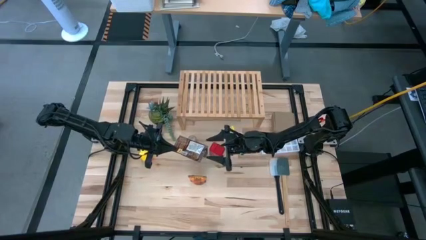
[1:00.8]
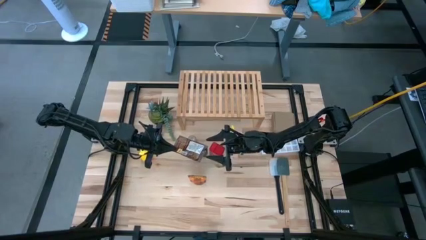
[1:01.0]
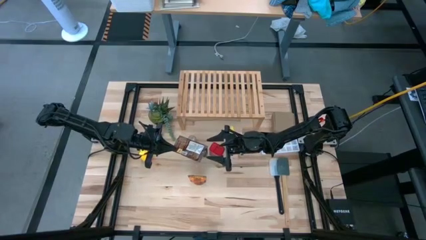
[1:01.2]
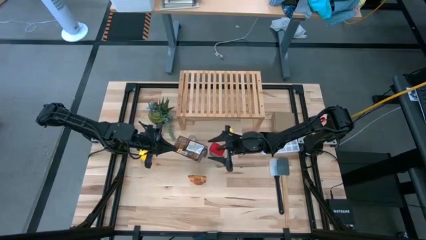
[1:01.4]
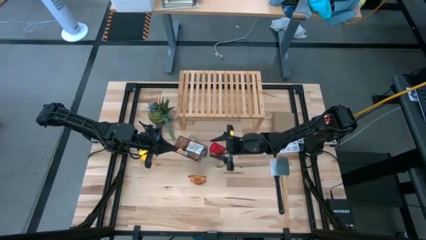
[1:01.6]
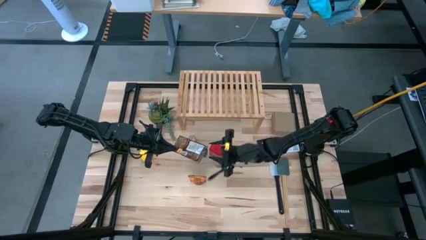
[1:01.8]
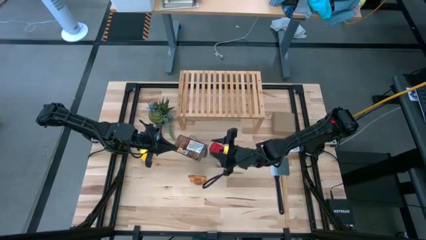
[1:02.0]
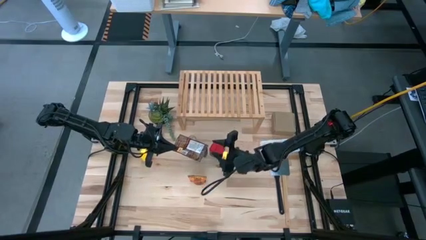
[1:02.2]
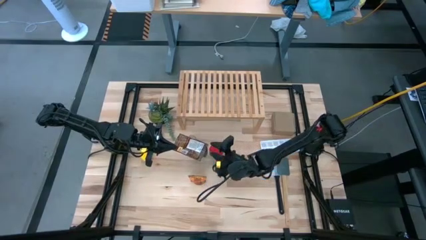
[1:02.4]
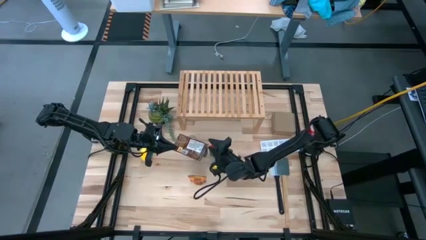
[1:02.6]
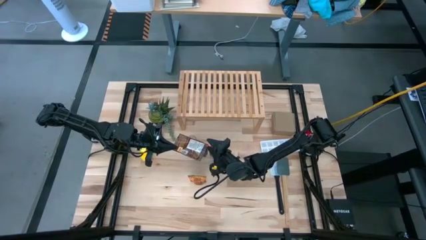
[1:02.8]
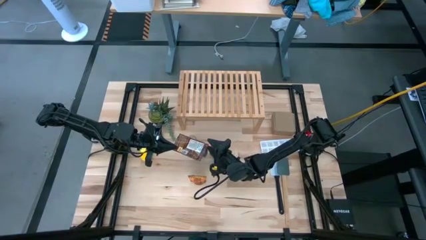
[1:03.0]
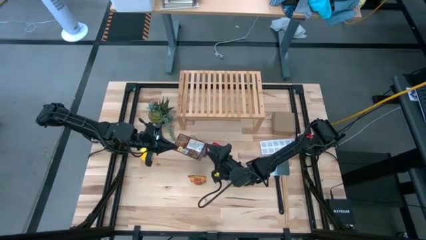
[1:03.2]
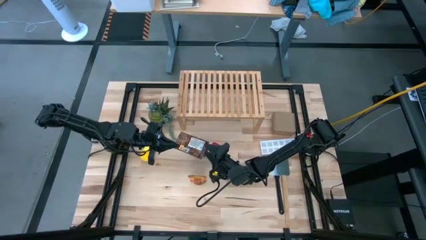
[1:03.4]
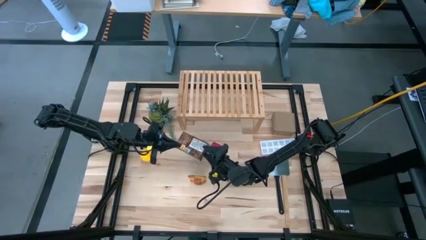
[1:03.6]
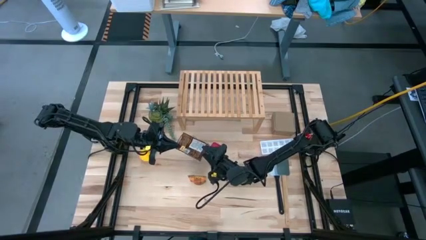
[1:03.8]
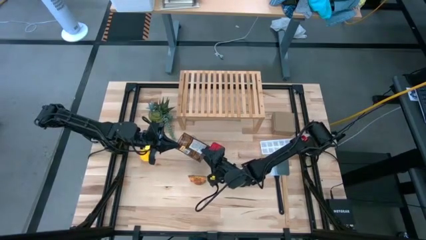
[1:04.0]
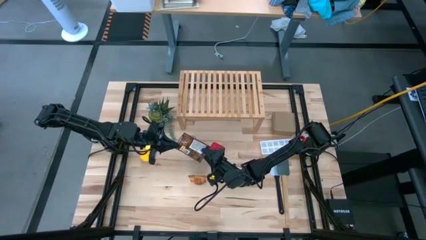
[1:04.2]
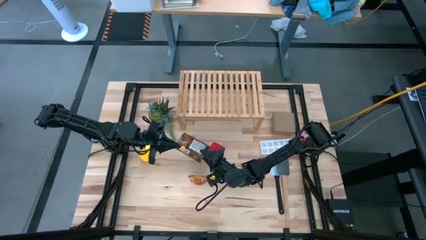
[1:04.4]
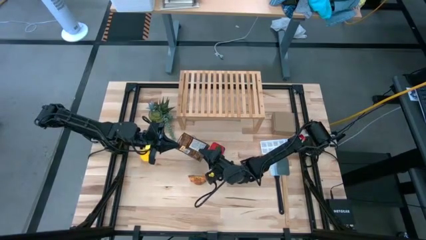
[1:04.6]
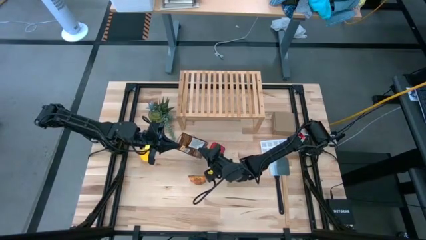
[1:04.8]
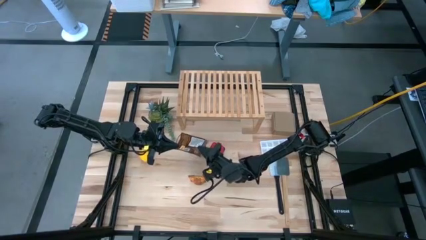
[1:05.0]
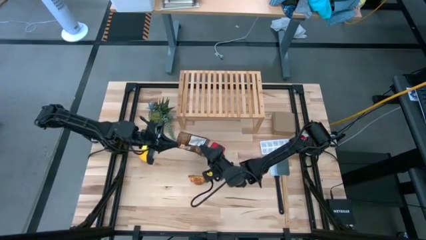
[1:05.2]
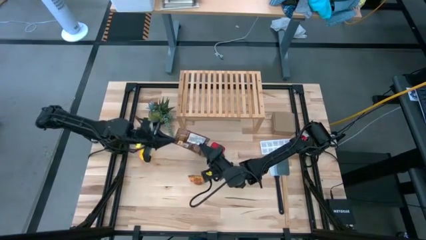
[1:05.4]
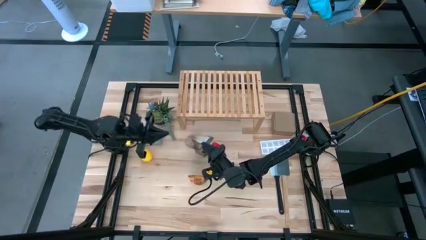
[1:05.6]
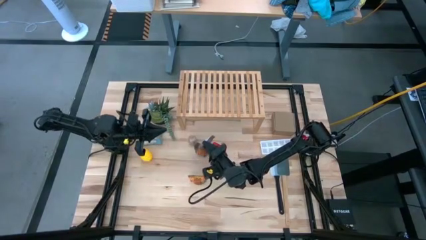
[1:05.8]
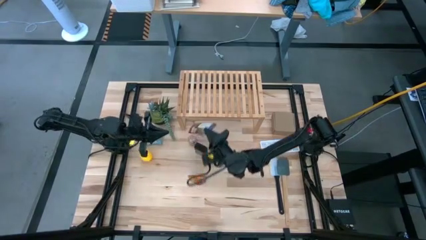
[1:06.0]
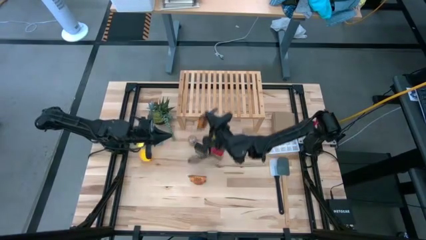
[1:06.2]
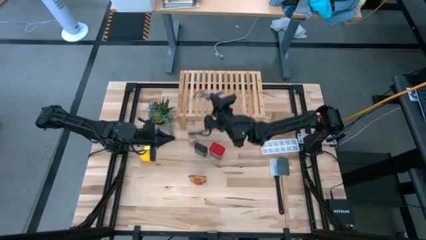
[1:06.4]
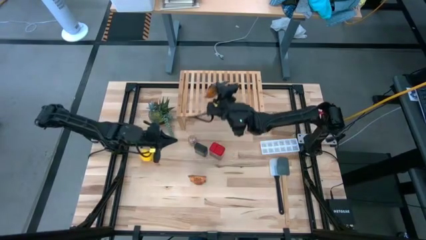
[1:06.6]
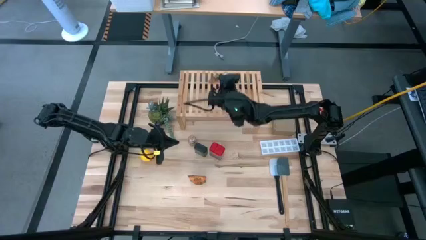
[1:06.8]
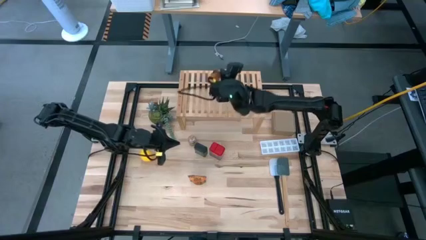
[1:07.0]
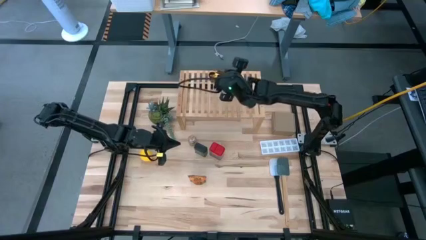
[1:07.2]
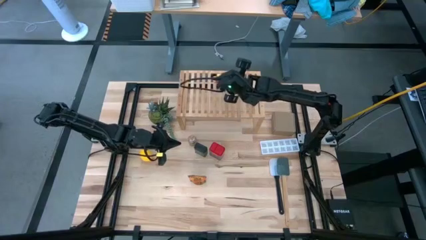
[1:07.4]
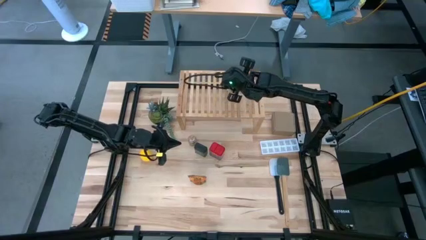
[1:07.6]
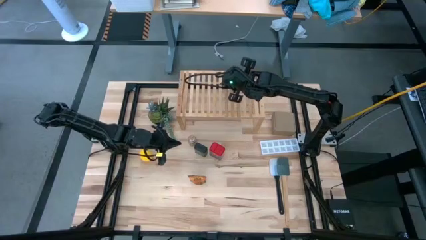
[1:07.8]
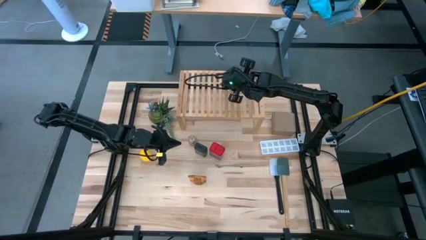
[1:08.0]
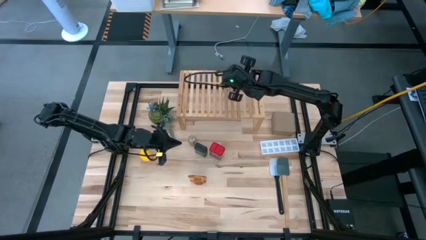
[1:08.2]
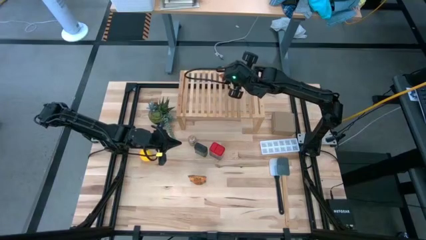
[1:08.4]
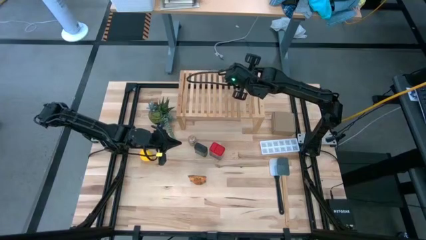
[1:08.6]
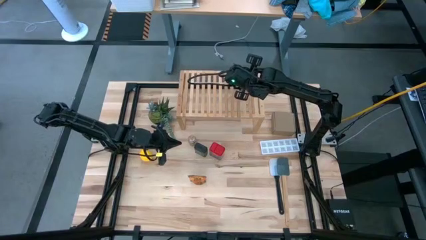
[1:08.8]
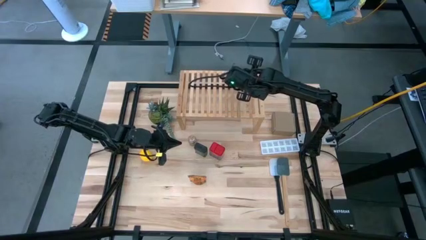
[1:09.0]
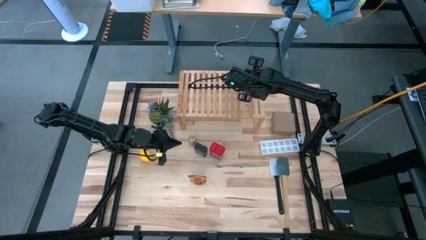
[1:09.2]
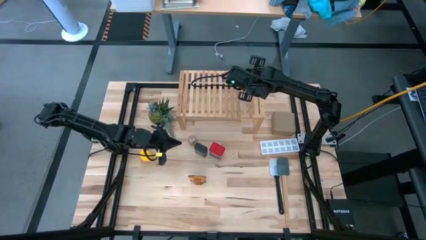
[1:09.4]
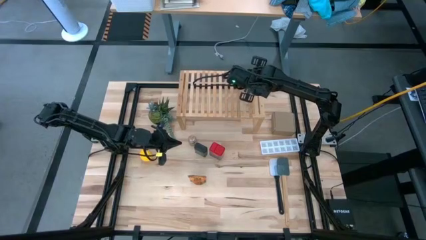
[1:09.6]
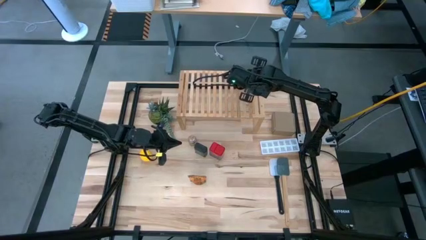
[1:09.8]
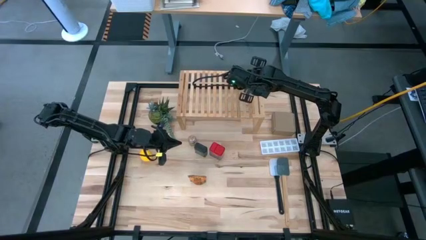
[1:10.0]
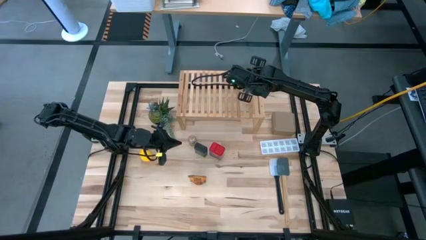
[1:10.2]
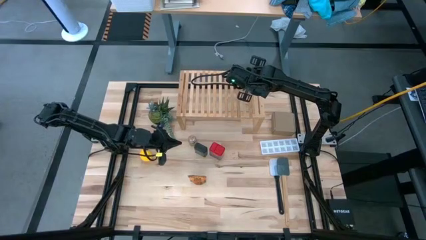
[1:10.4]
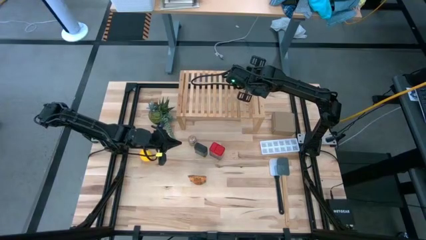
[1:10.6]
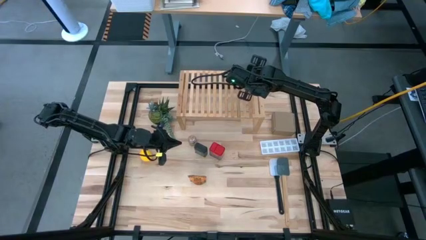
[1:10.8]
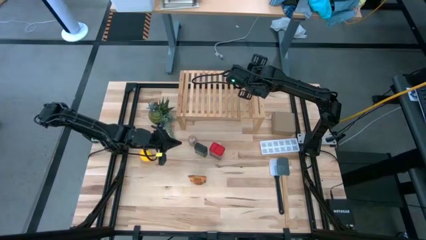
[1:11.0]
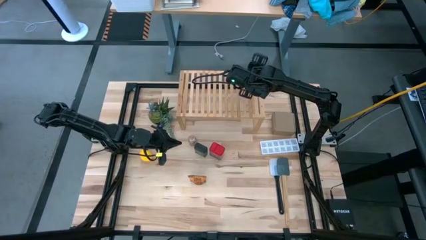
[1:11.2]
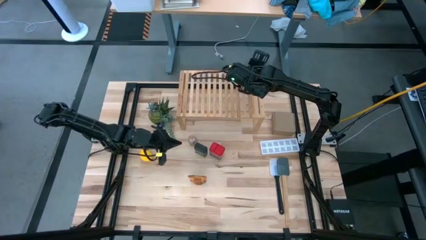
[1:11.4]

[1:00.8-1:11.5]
Task: Shelf spices
Put the orange seasoning pack on the shelf

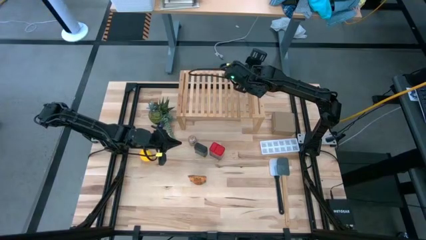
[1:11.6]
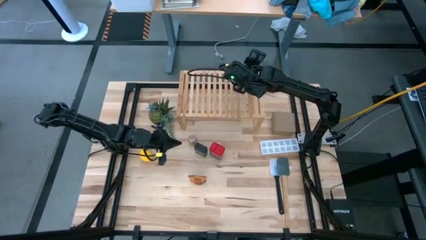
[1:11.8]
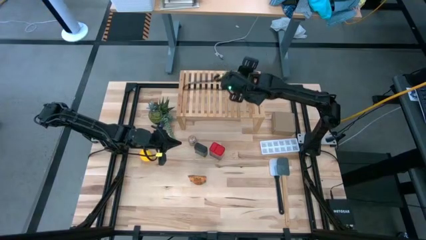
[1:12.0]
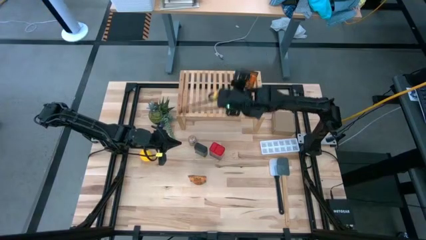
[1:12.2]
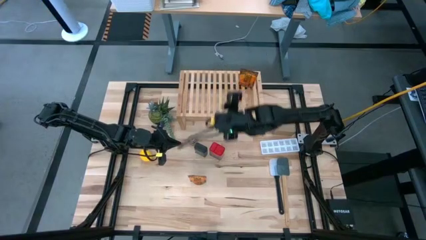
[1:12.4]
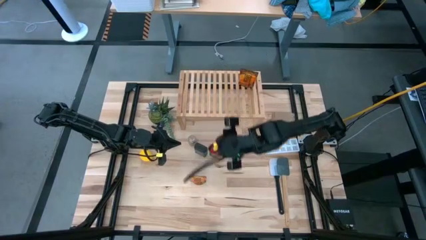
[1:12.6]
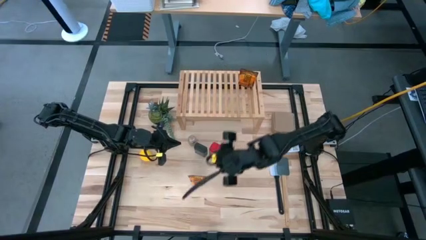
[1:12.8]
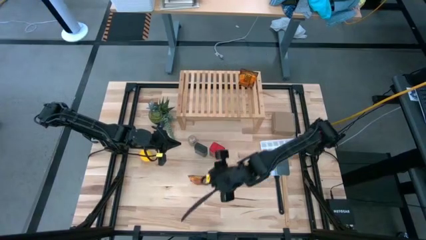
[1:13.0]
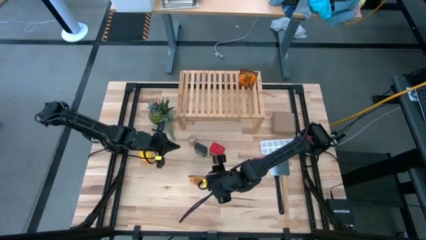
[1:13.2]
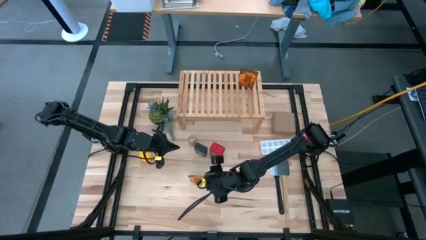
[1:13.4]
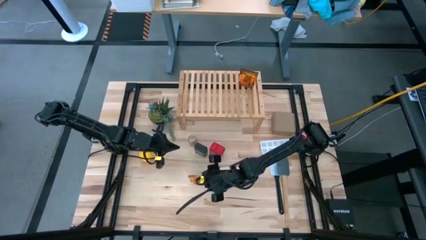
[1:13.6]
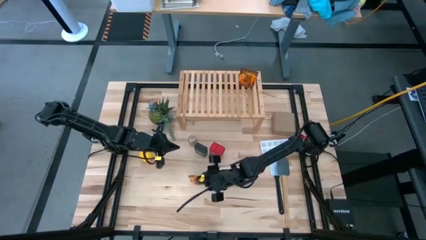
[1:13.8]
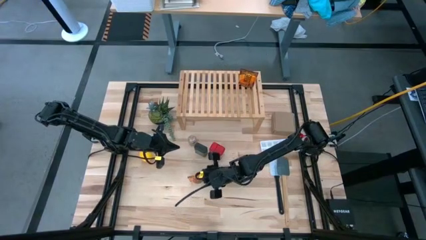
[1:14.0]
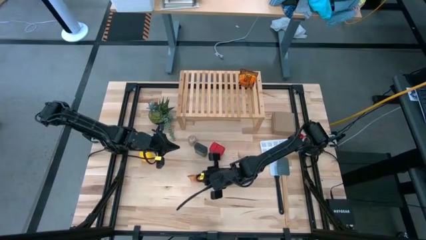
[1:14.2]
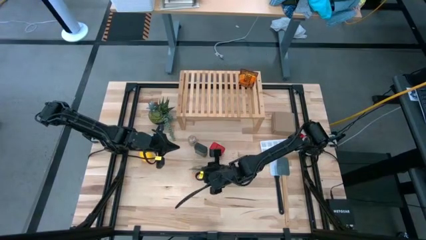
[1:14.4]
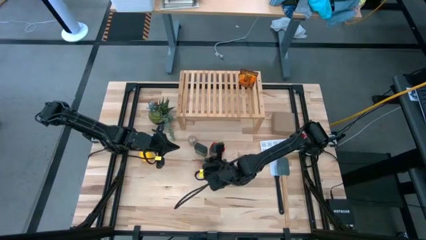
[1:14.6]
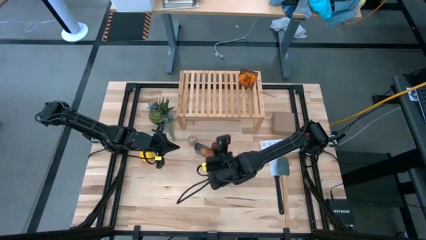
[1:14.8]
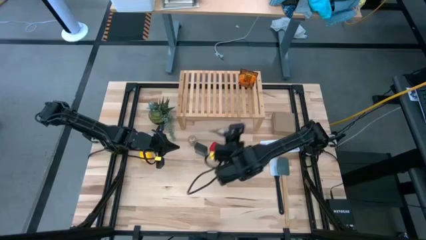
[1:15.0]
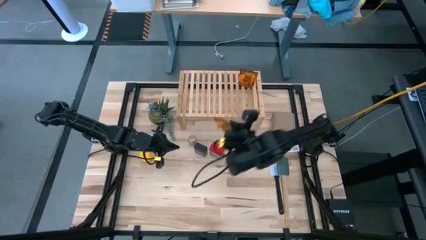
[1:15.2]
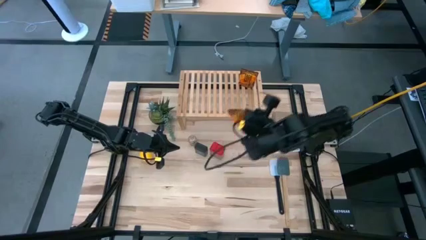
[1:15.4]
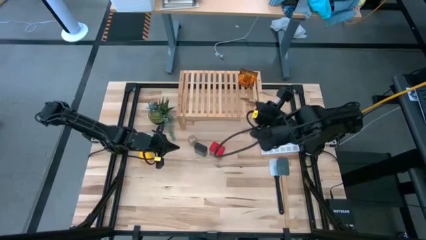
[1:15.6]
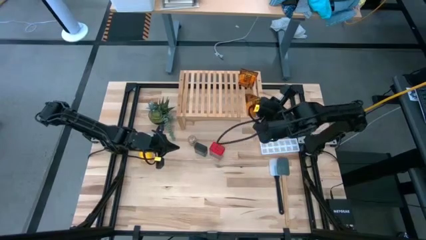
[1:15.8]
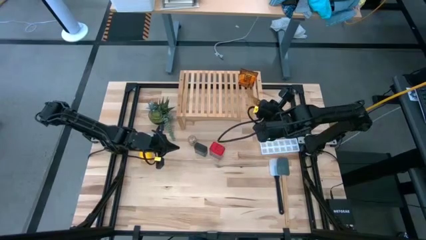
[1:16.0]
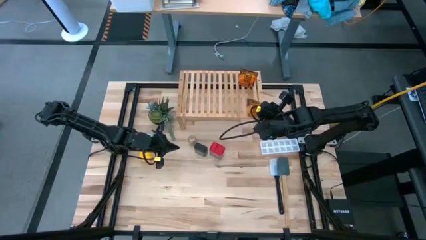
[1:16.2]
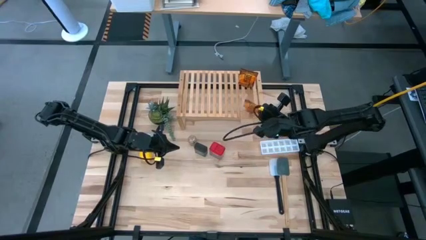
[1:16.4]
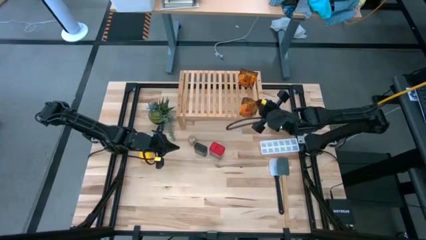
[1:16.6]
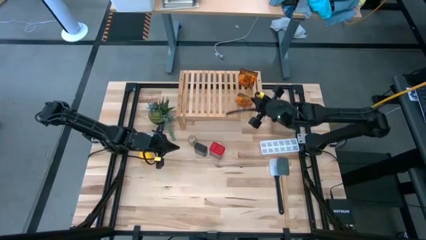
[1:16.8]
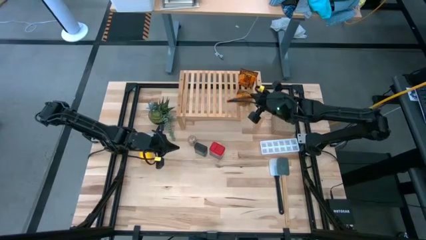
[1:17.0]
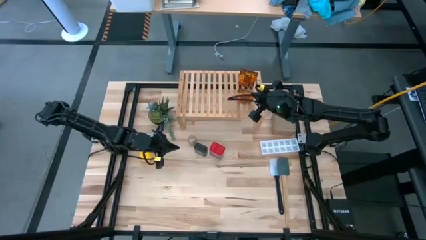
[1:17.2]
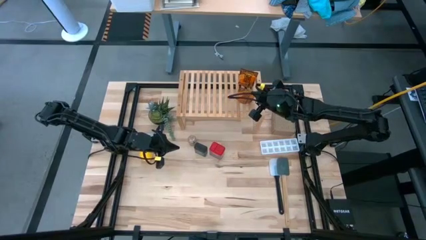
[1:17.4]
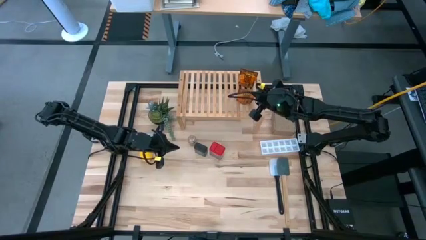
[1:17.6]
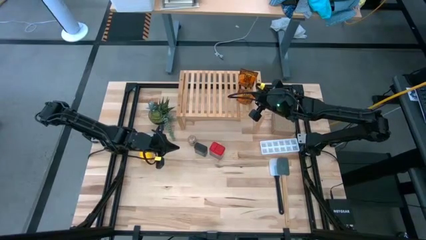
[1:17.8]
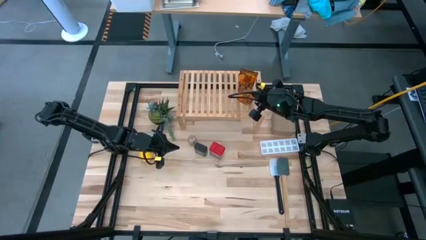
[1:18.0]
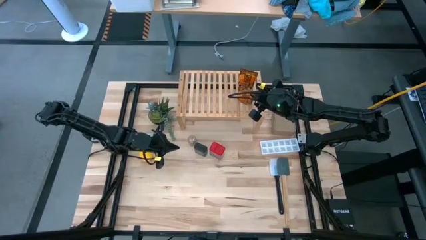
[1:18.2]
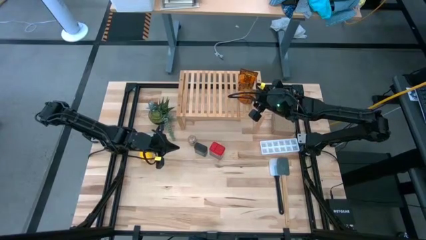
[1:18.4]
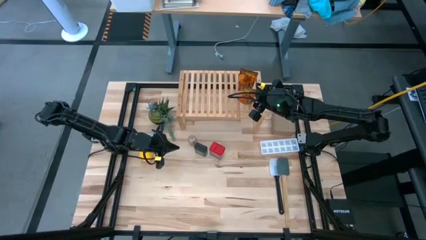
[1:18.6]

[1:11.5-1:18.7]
Put the orange seasoning pack on the shelf
